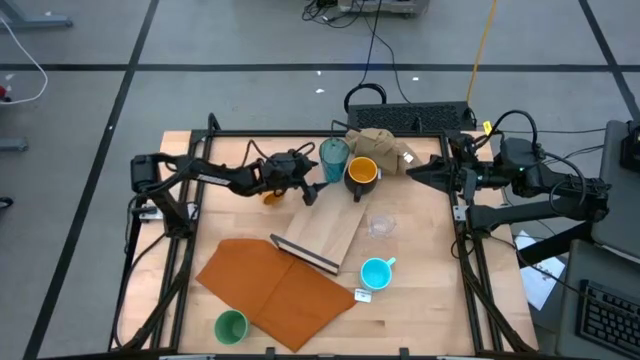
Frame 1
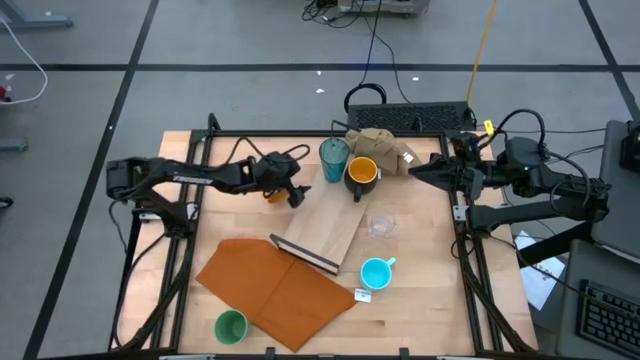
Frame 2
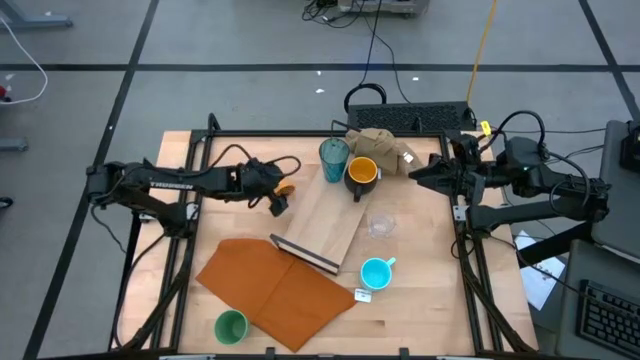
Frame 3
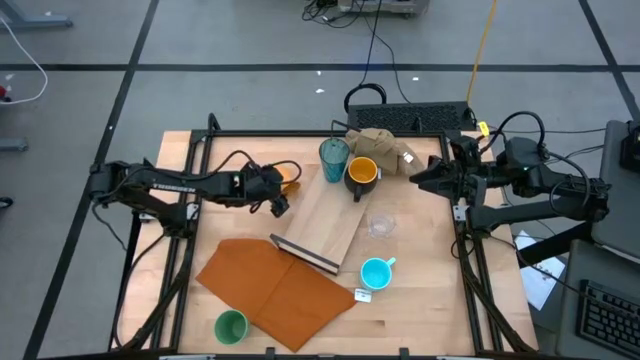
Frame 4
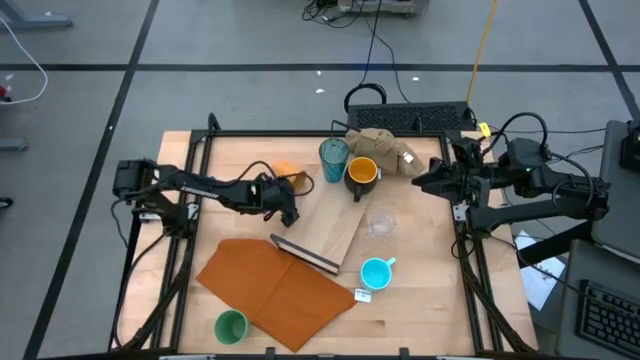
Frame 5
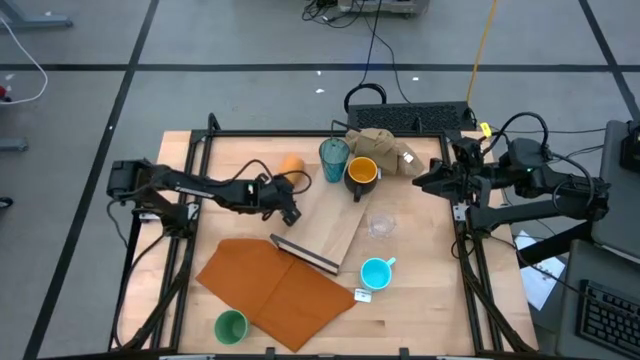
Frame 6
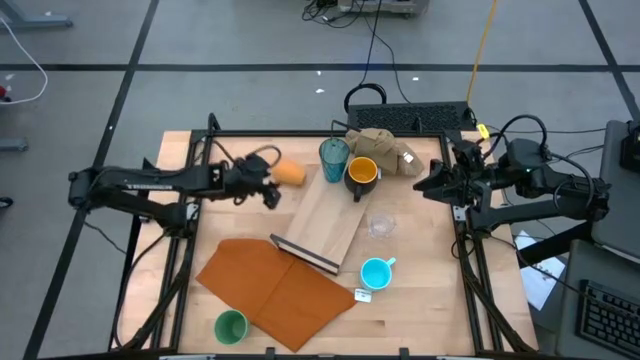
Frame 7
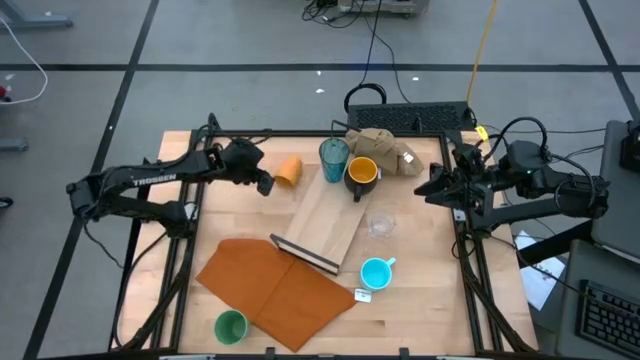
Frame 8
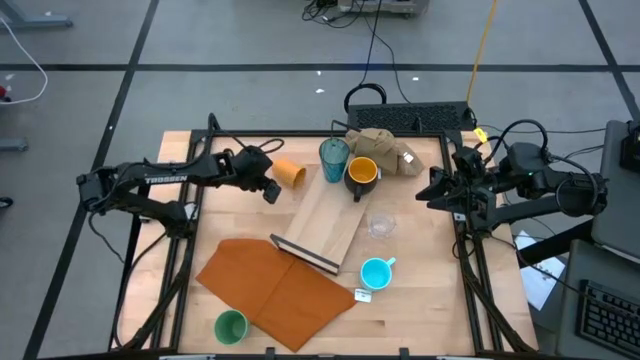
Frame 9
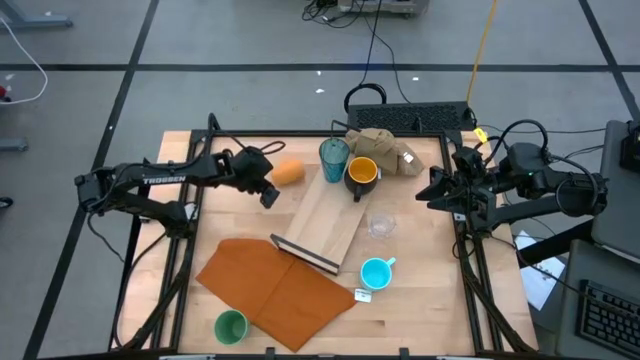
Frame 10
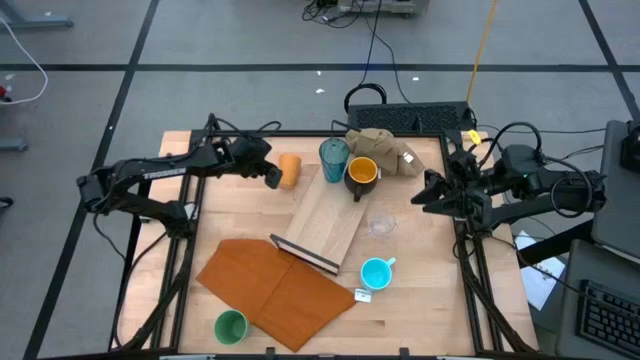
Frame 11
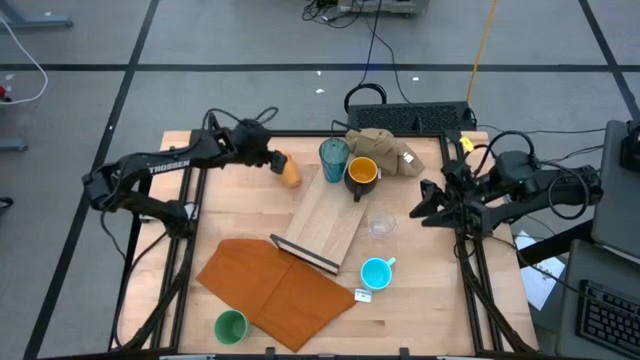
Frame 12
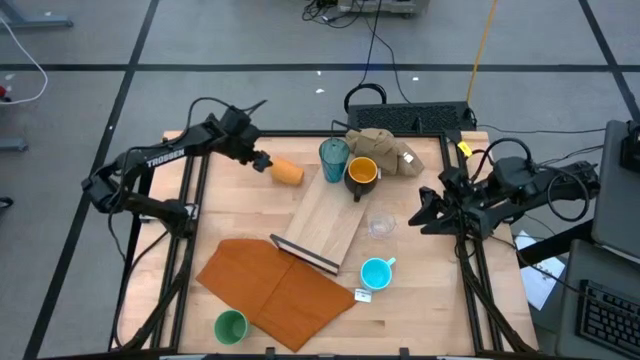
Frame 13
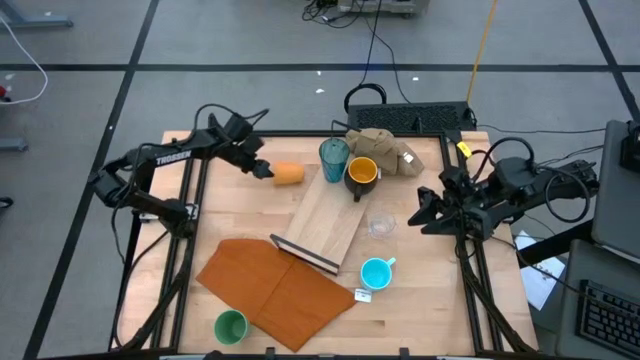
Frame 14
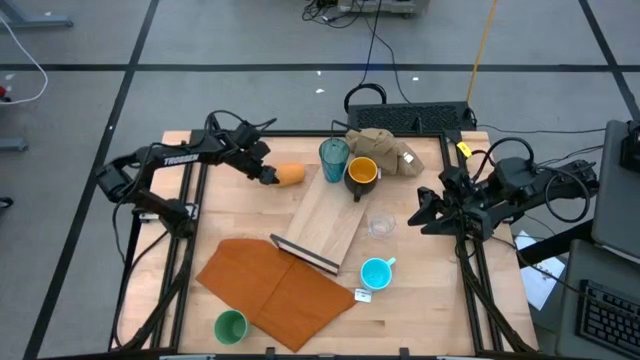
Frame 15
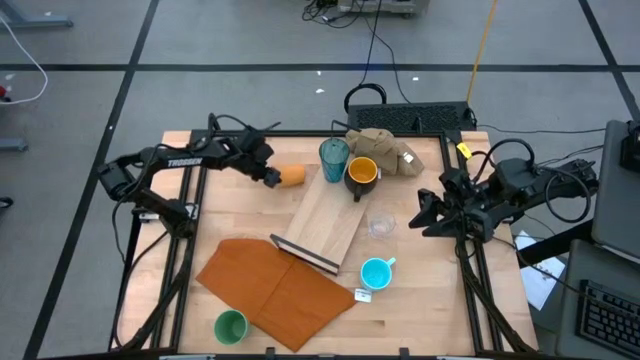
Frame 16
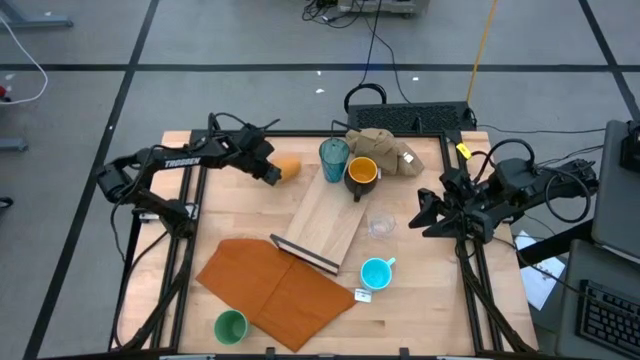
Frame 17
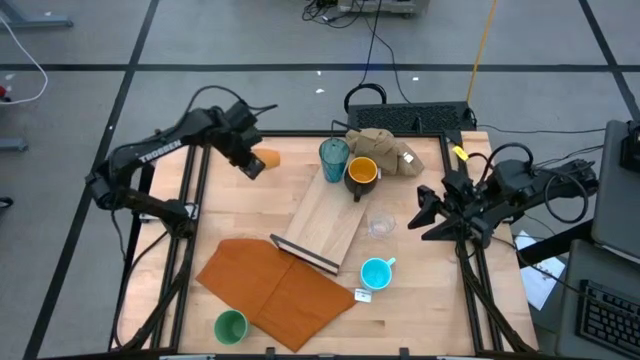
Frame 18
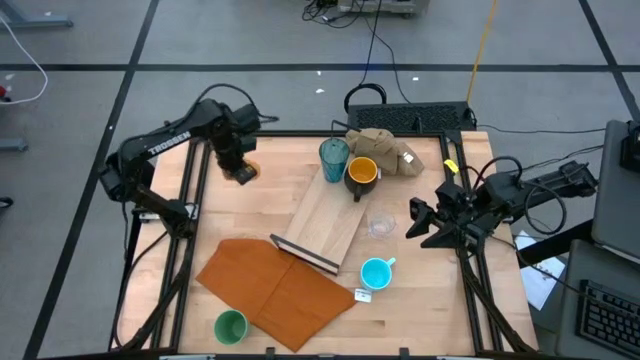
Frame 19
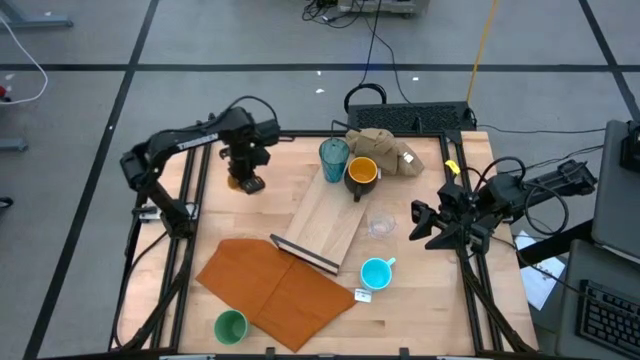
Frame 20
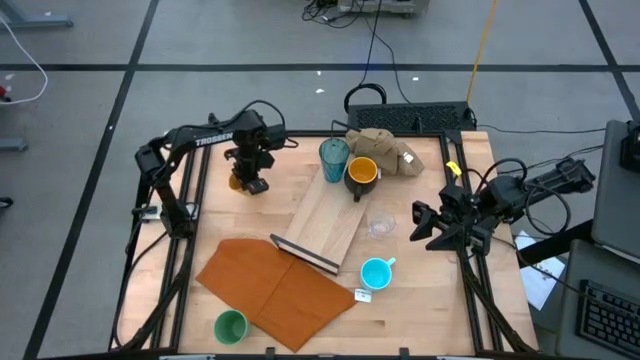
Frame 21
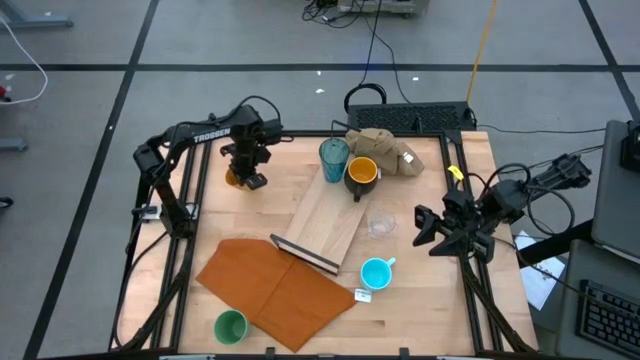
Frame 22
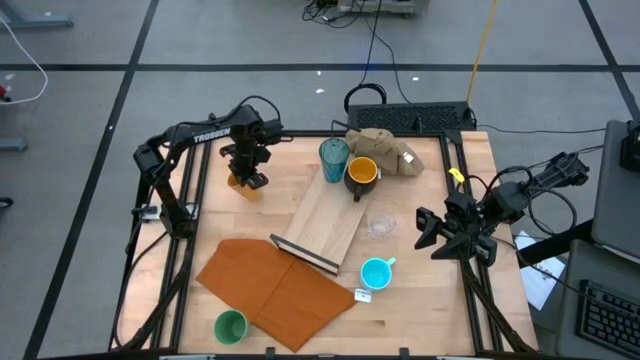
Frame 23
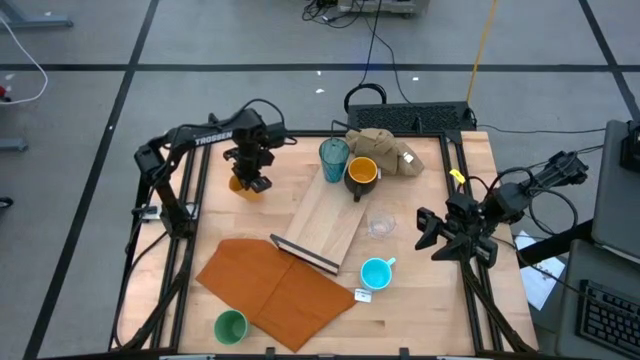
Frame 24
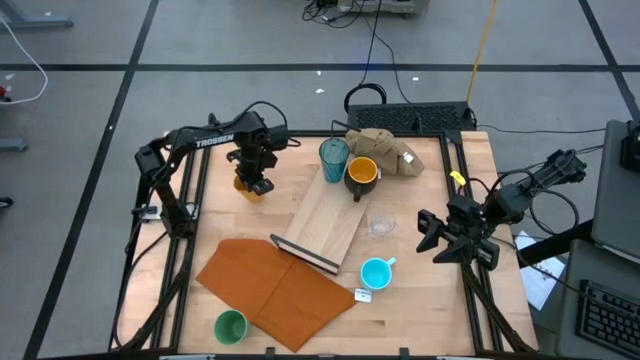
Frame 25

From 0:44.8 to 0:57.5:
Task: Stack small to large cups/mugs on shelf
Put the orange cup on the table

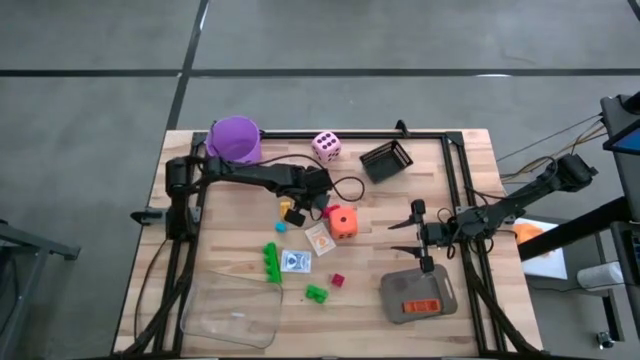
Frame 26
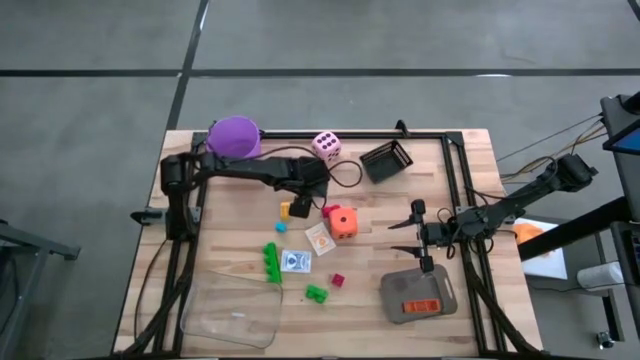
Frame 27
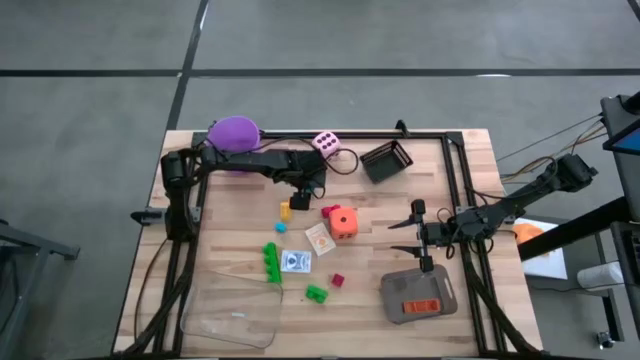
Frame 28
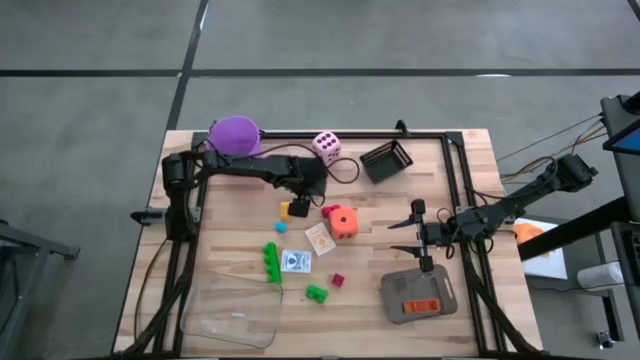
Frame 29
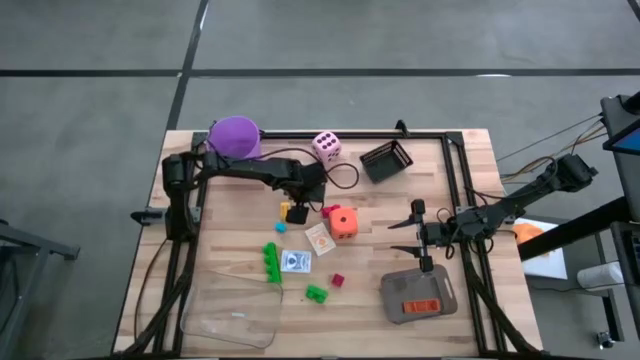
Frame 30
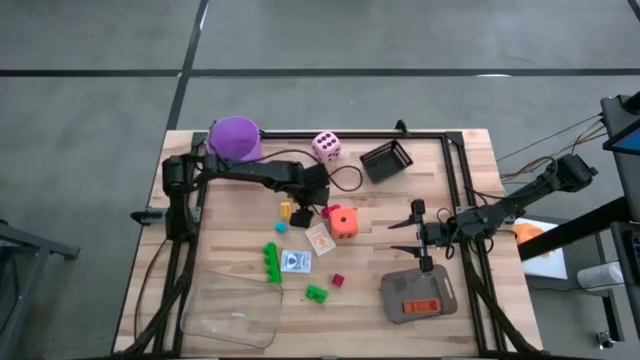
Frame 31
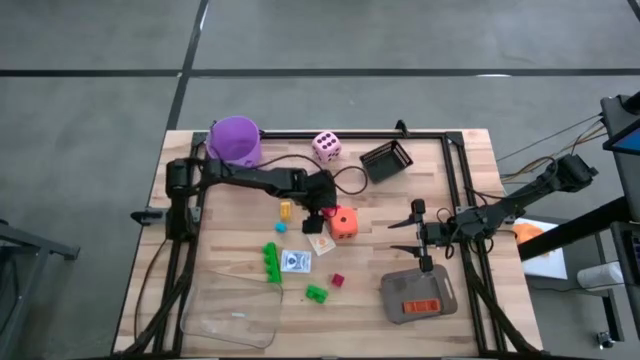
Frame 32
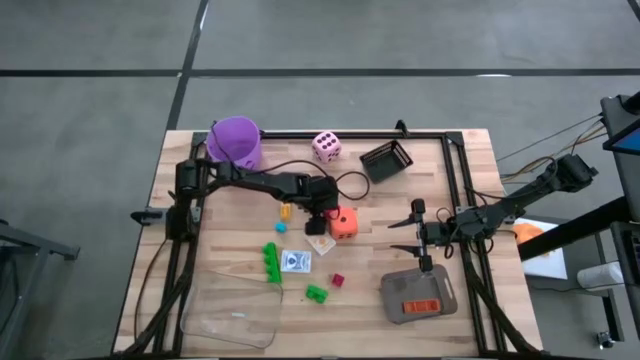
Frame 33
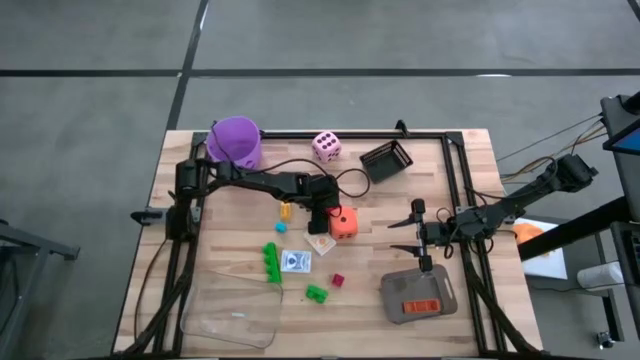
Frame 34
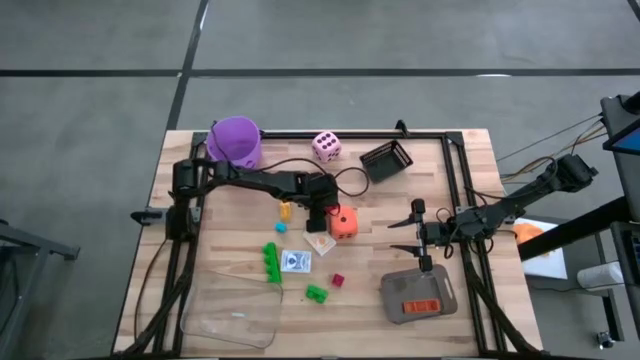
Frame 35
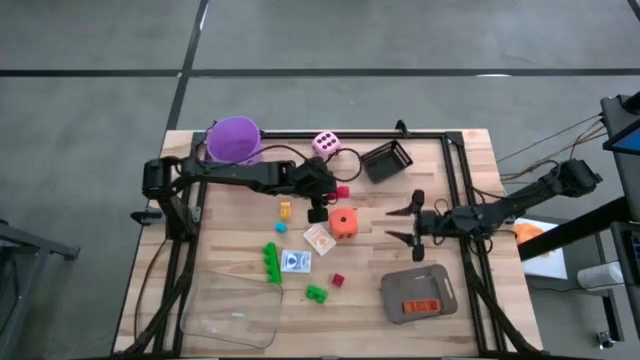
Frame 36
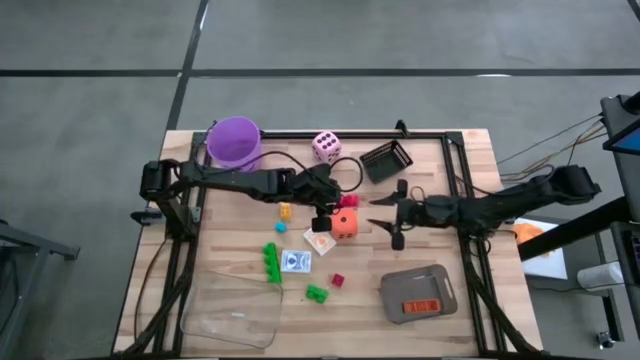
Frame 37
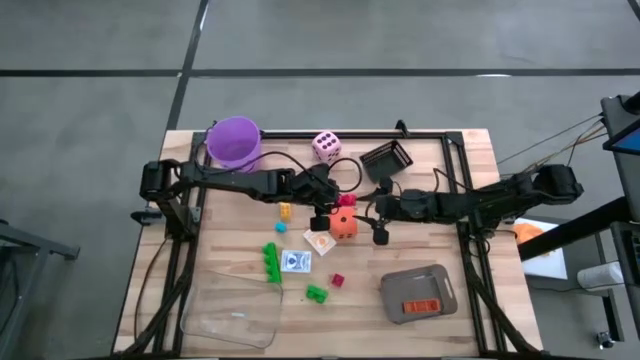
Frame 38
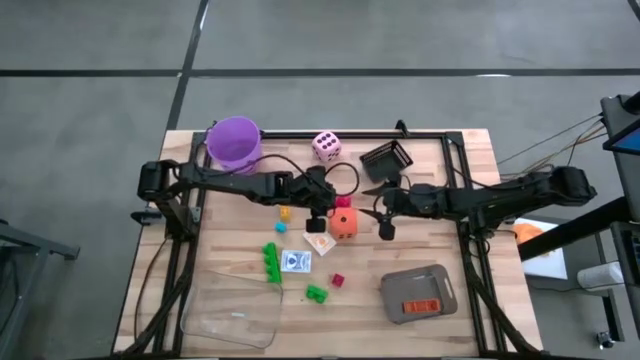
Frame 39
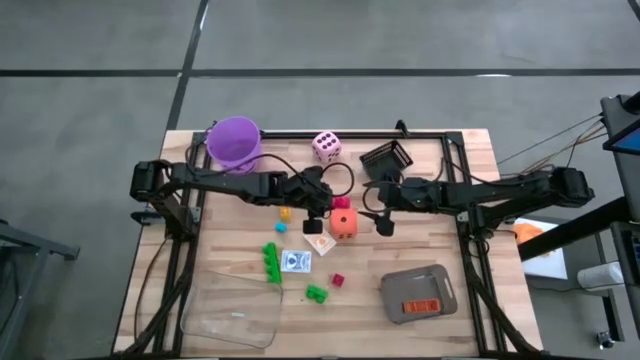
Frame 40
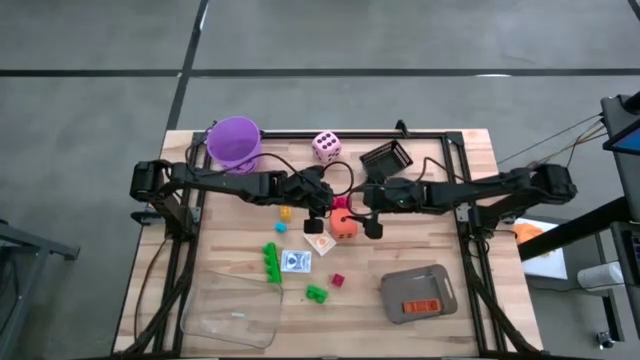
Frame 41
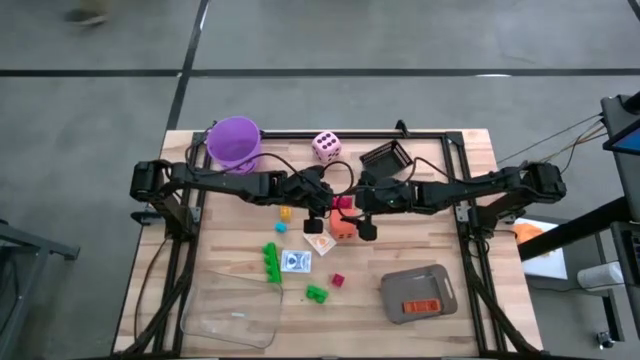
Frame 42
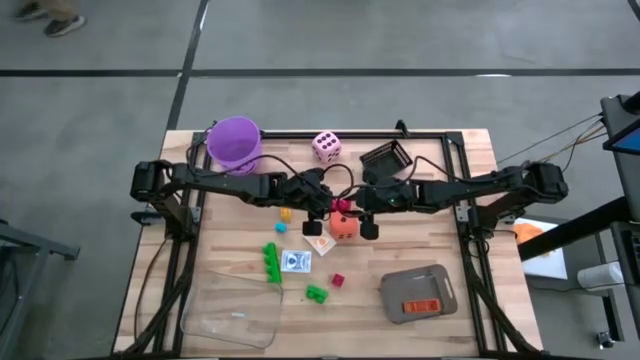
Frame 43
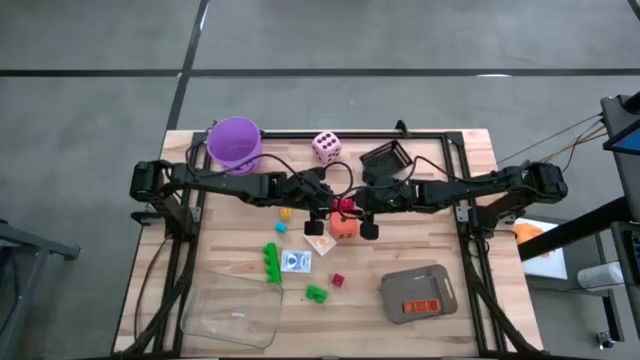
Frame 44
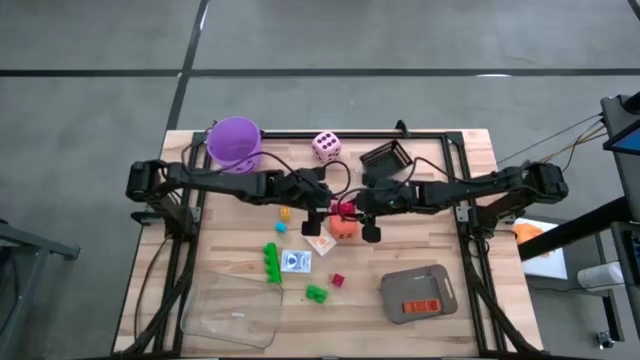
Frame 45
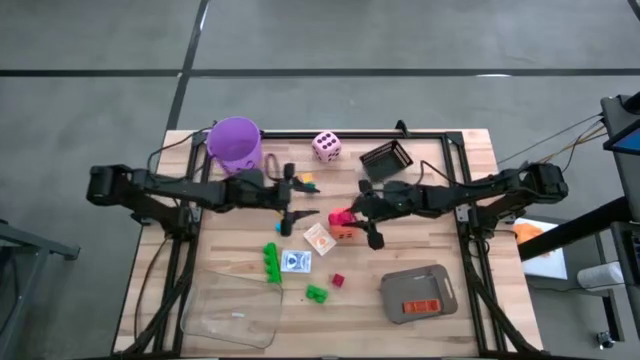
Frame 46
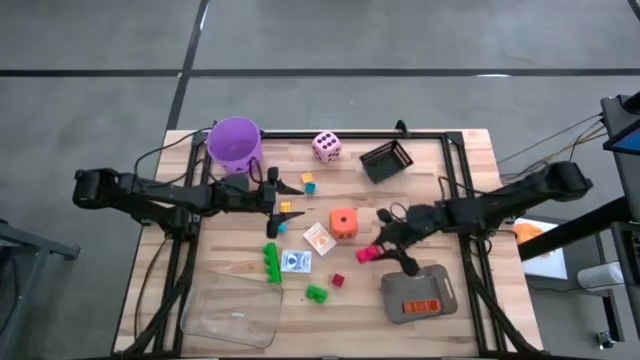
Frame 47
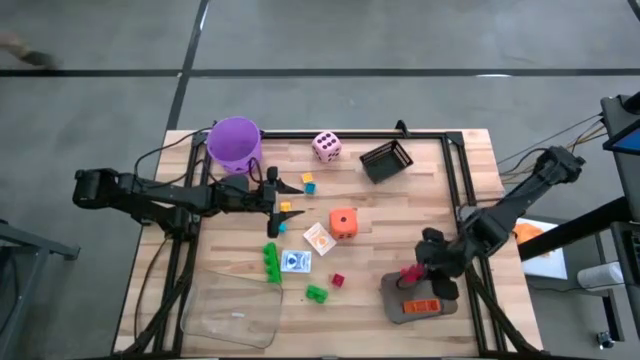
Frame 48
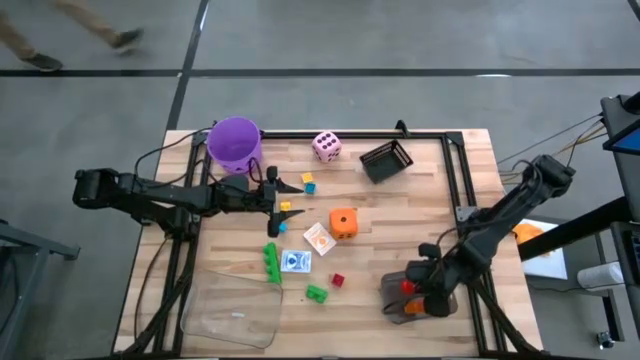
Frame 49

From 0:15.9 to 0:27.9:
Task: Pick & Place Toys
Put the red game piece into the black bin
